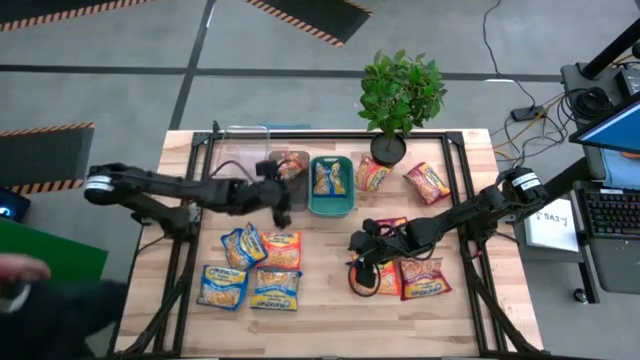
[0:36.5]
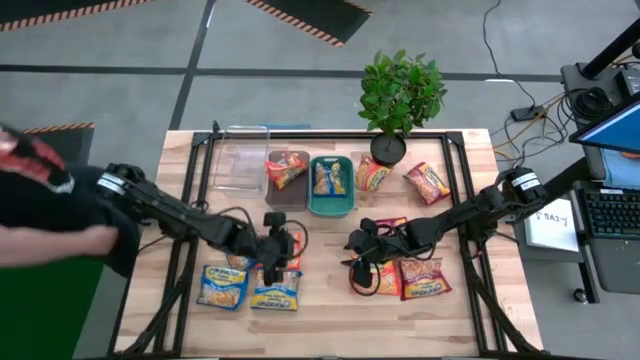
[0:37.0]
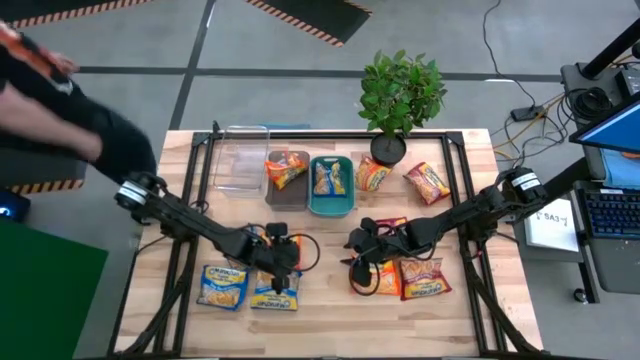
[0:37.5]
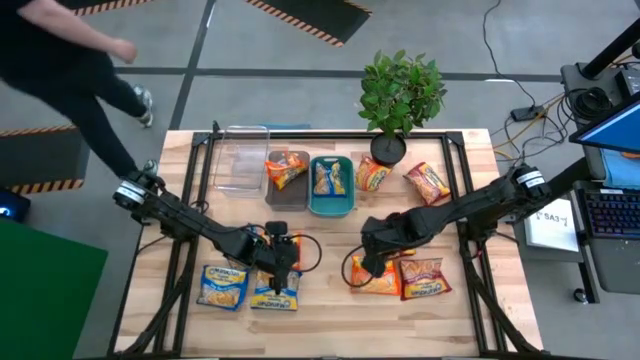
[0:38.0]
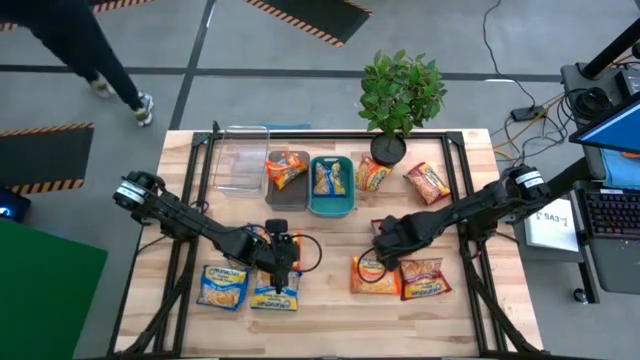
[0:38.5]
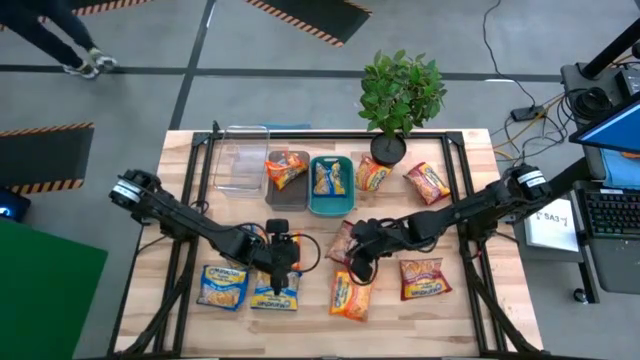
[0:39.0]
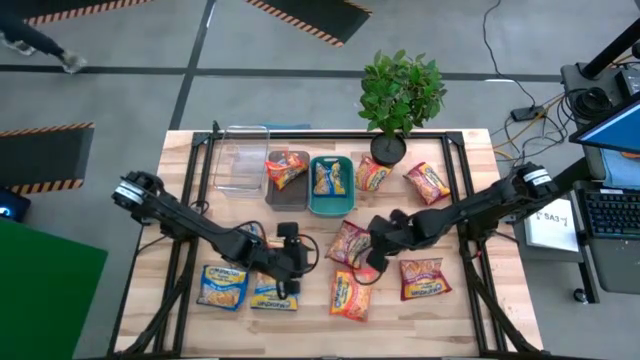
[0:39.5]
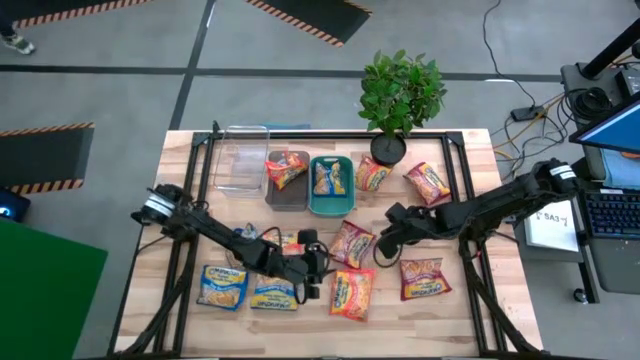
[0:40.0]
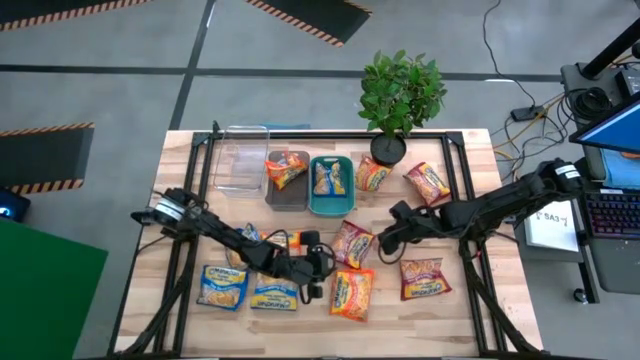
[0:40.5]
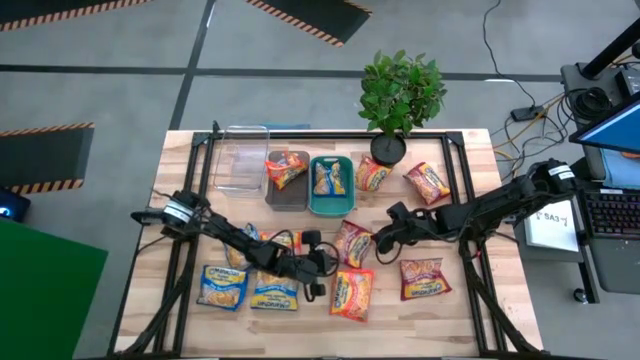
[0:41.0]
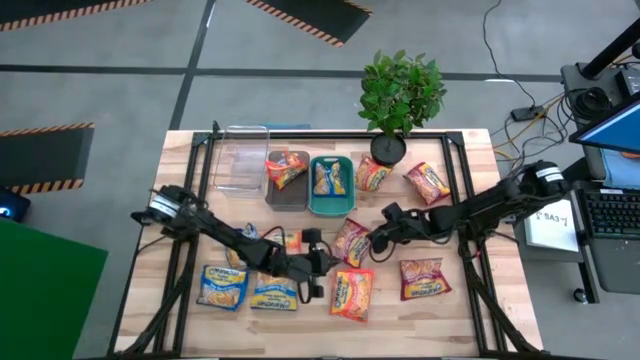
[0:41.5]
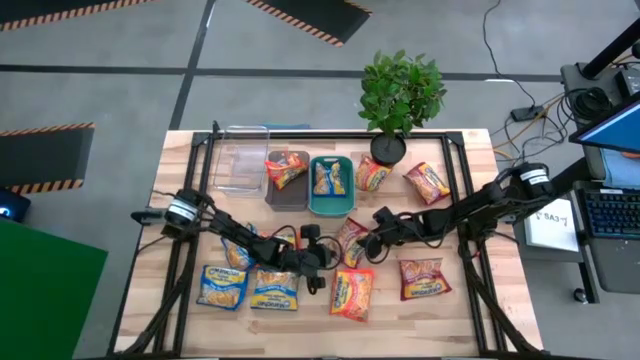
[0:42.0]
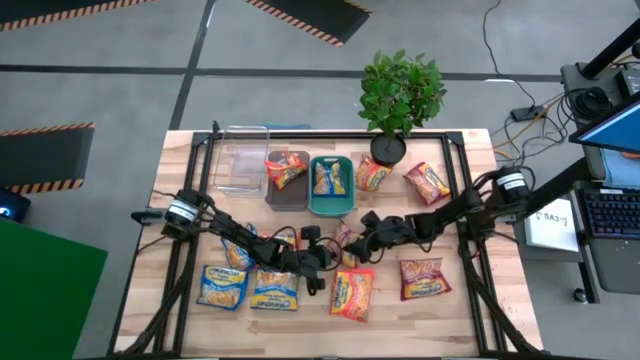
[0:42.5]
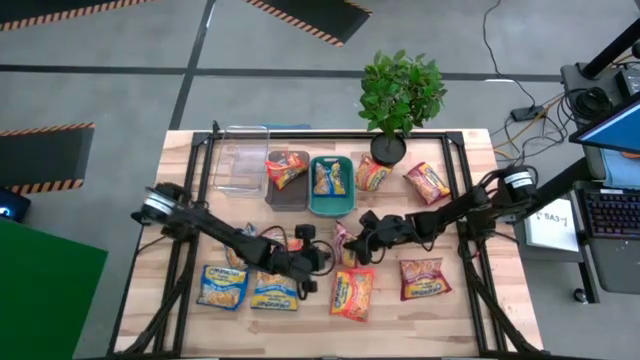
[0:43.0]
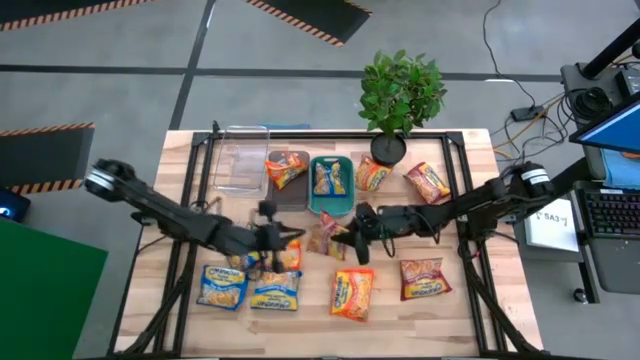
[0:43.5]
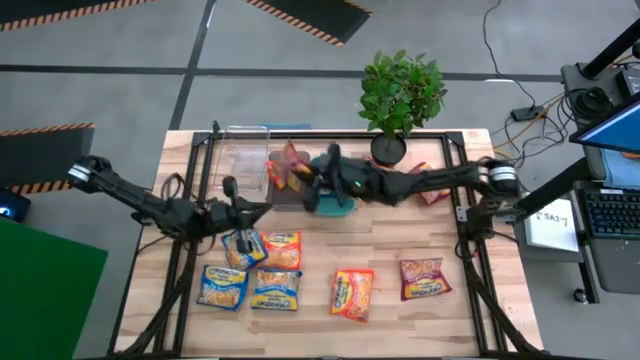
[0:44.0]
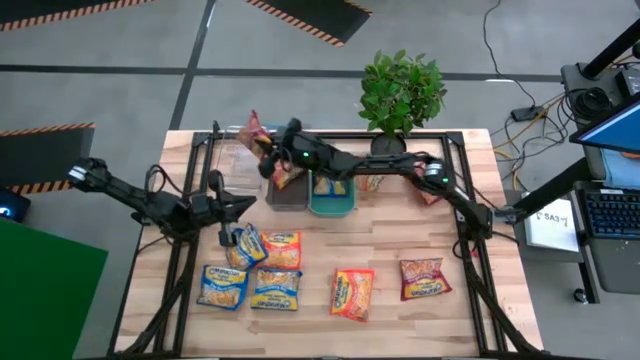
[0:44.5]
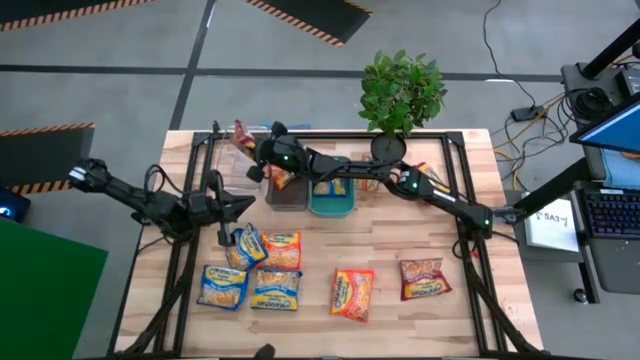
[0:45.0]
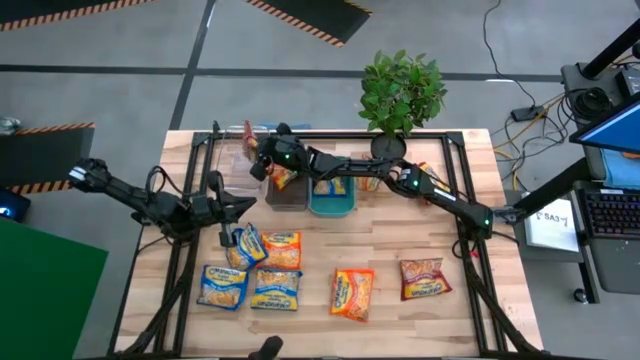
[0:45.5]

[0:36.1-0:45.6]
Task: Sort Maruchan noodles
Put the red noodle pack into the transparent bin

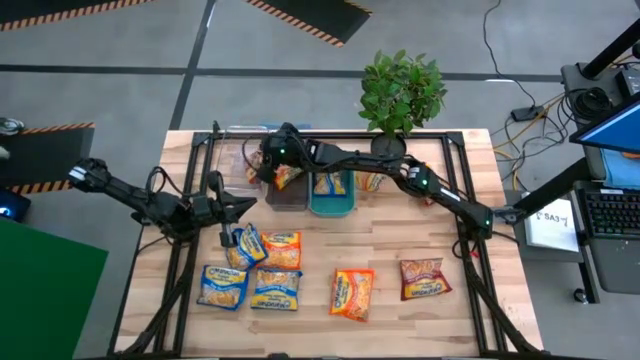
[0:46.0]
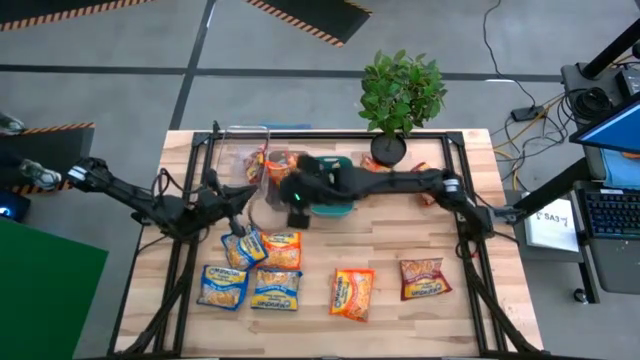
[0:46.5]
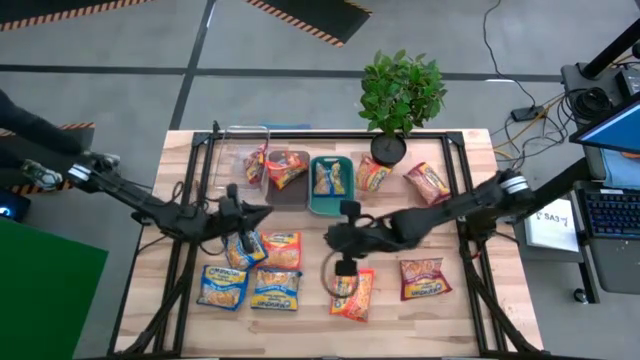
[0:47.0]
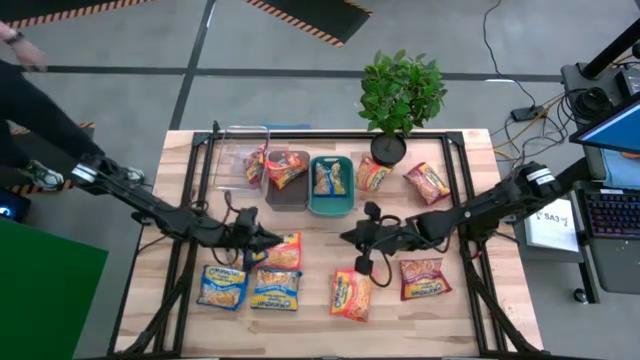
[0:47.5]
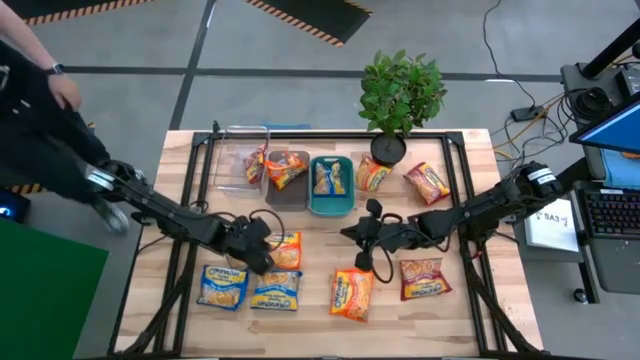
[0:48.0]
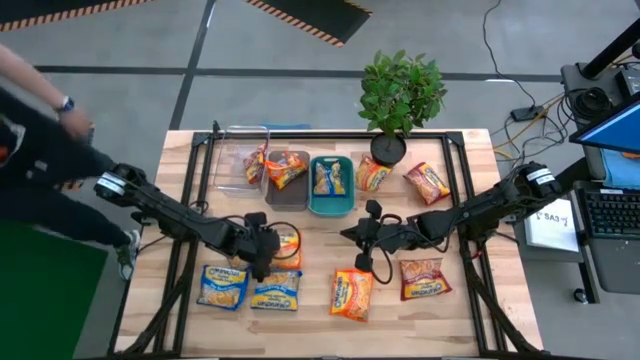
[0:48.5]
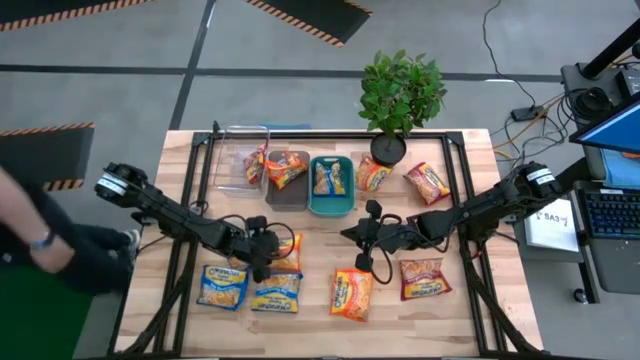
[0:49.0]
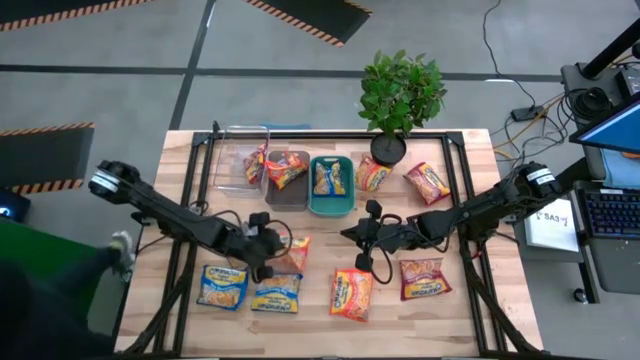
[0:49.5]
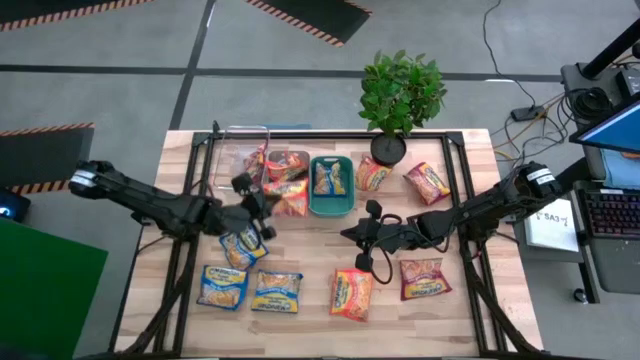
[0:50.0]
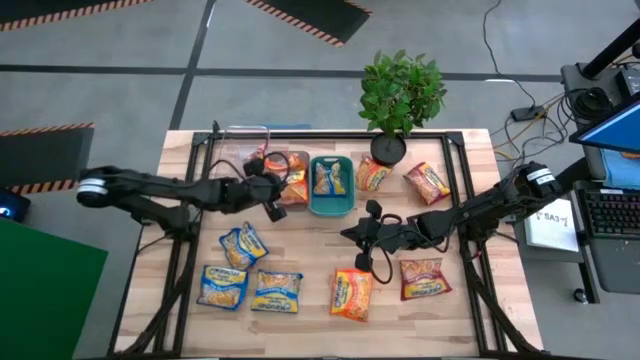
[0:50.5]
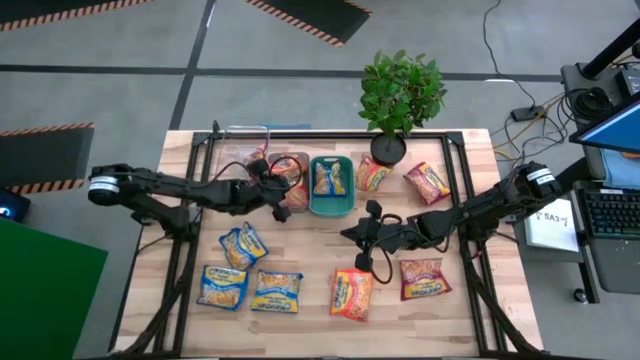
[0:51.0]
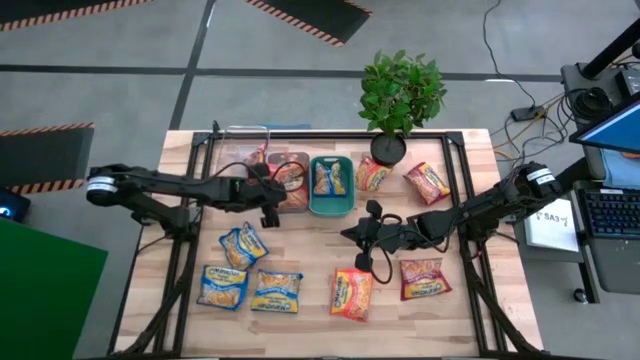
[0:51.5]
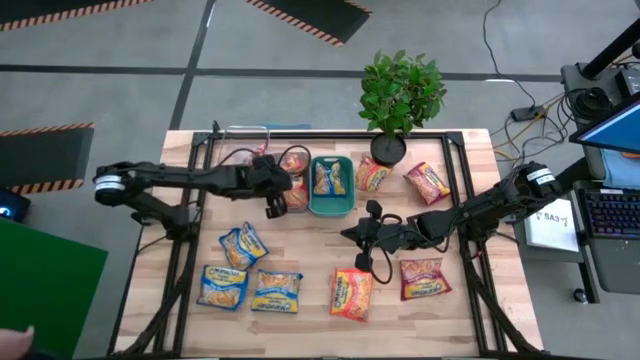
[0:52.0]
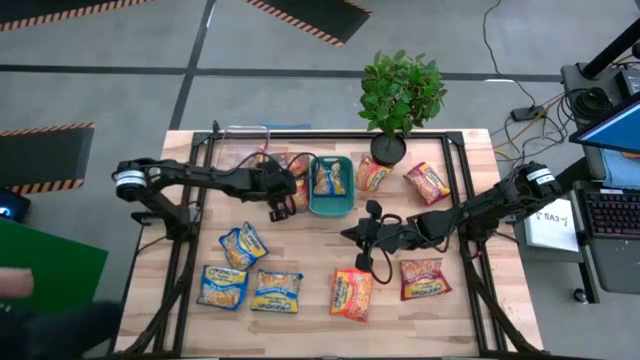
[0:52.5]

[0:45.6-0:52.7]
Put the orange noodle pack into the black bin

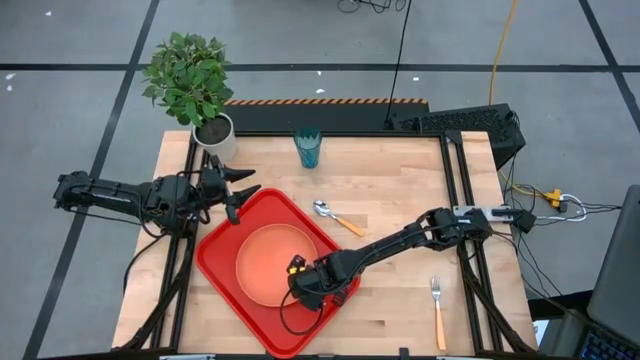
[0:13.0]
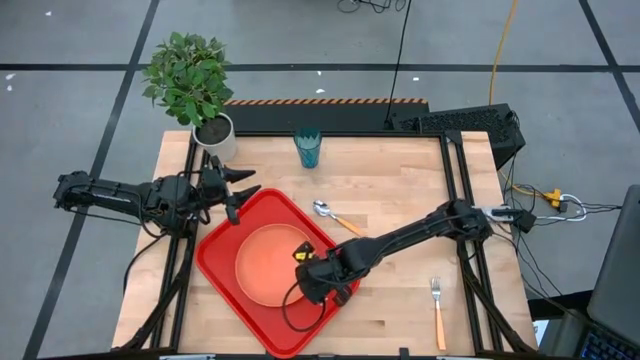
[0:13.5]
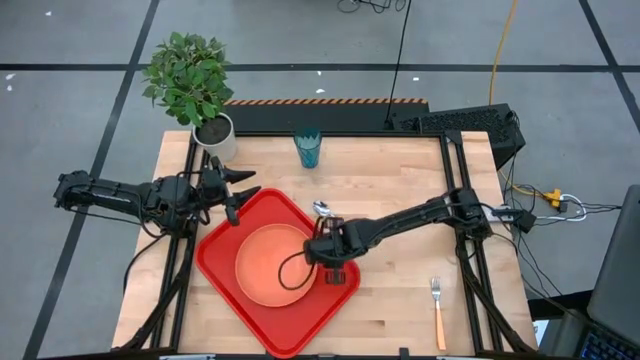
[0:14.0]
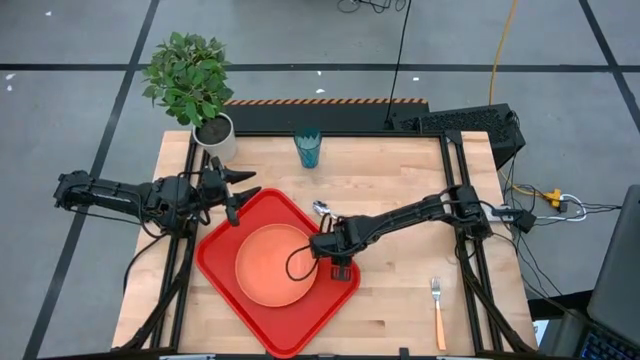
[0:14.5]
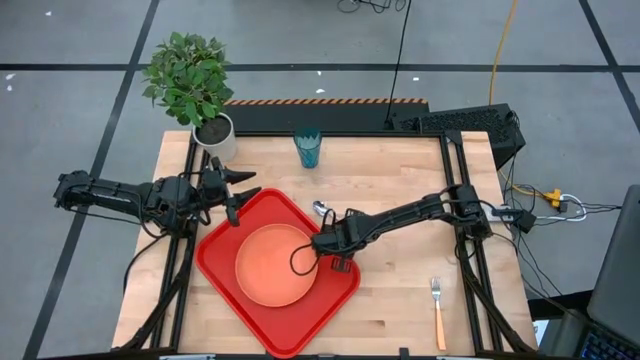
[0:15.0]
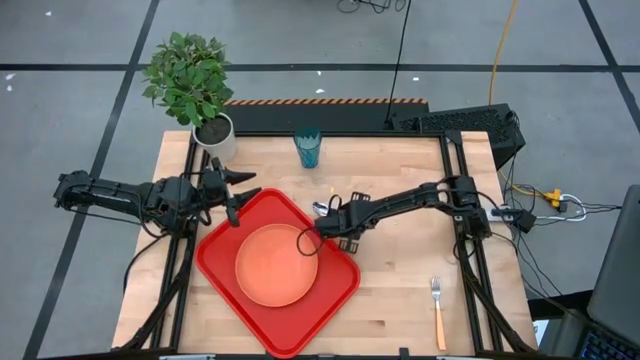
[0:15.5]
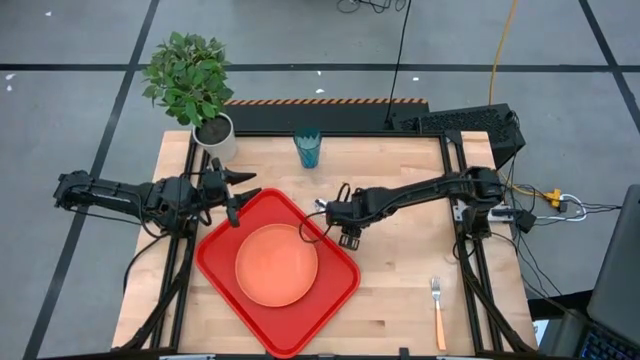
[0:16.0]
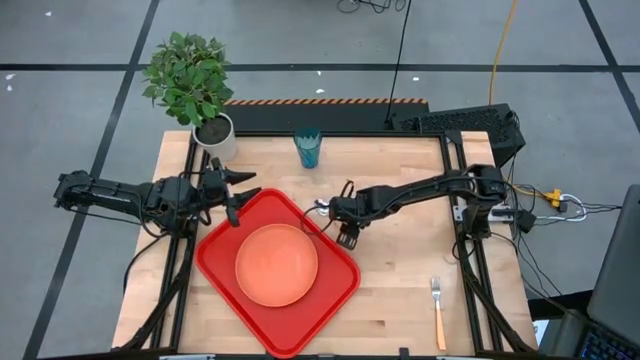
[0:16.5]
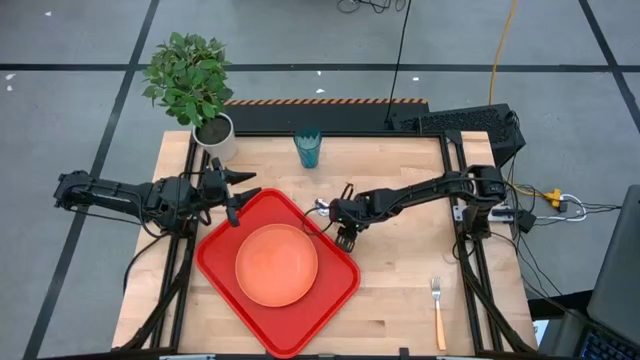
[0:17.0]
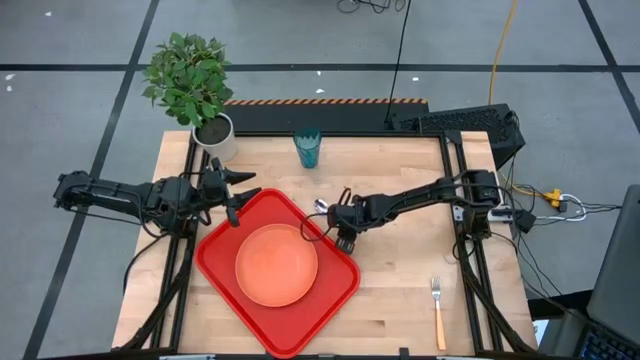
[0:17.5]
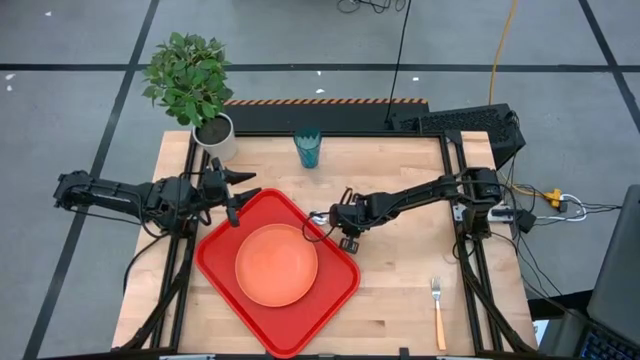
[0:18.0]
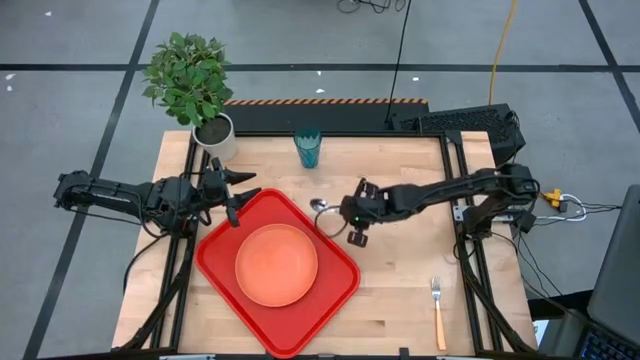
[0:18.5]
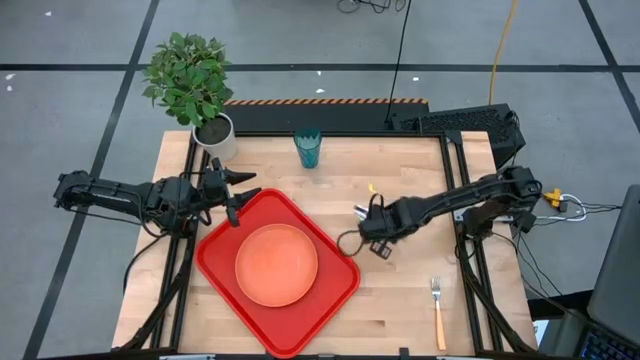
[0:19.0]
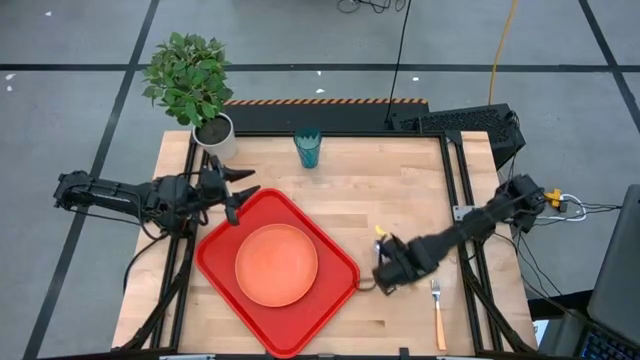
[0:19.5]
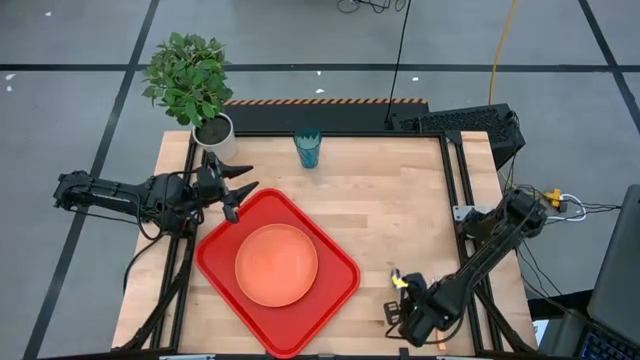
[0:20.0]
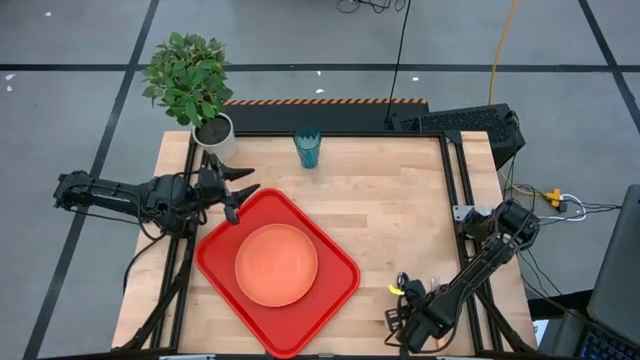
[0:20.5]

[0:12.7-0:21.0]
Task: Pick and place plate/cup/fork/spoon on tray
Move the yellow spoon to the bottom right of the table
